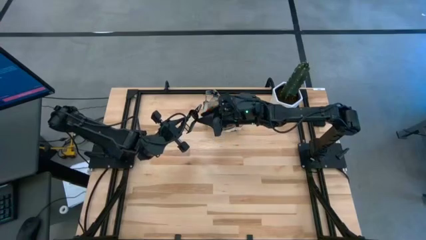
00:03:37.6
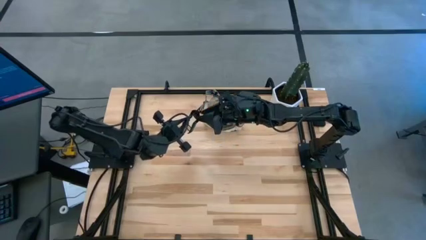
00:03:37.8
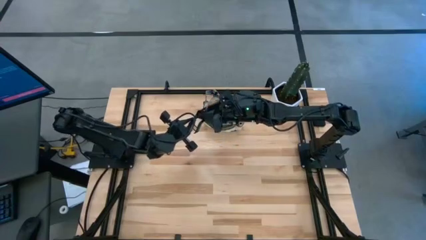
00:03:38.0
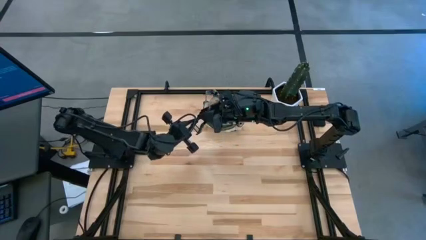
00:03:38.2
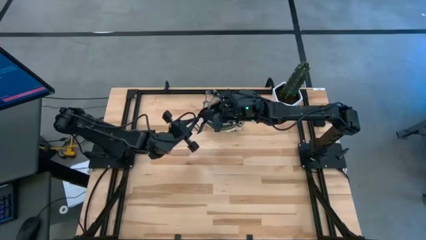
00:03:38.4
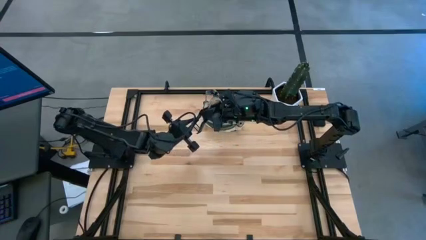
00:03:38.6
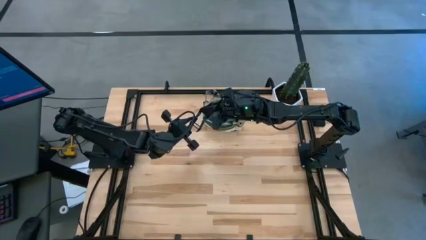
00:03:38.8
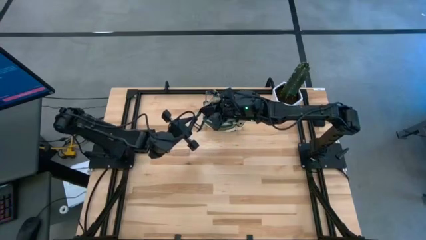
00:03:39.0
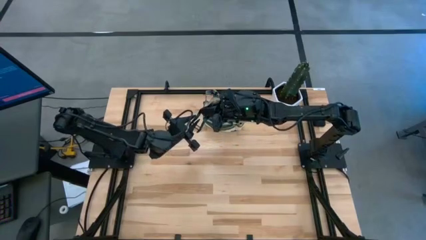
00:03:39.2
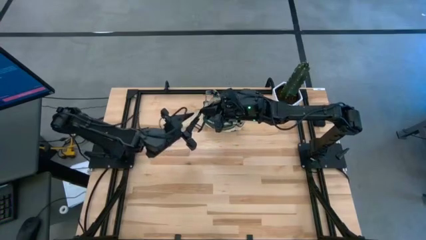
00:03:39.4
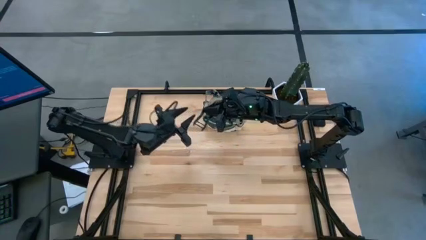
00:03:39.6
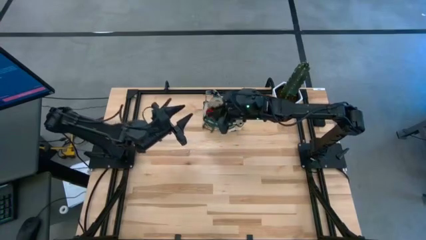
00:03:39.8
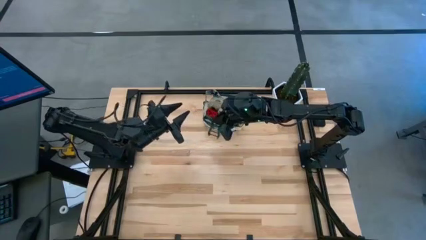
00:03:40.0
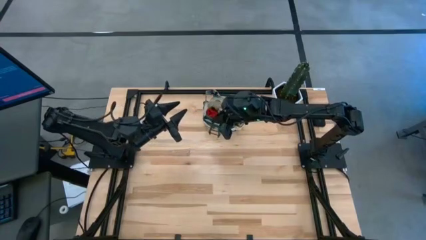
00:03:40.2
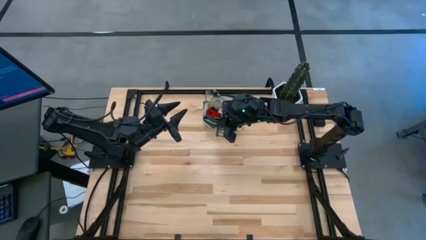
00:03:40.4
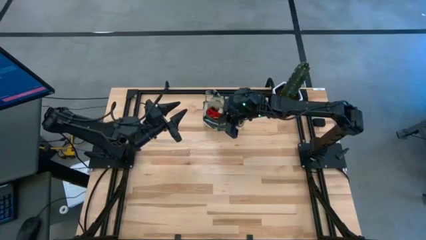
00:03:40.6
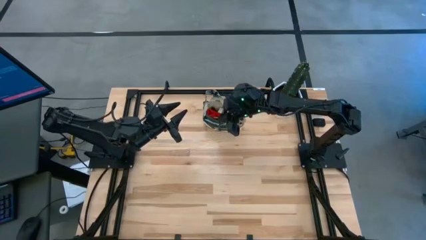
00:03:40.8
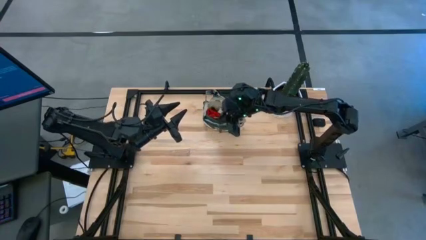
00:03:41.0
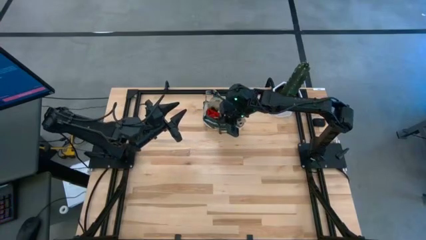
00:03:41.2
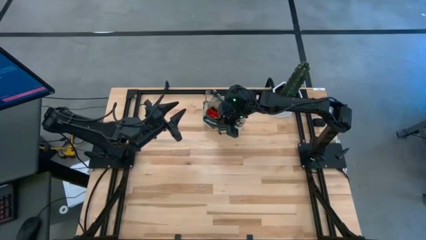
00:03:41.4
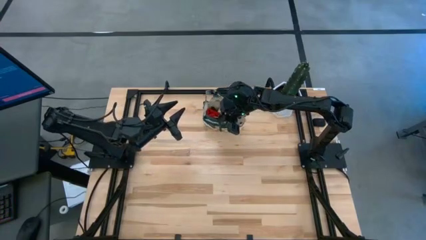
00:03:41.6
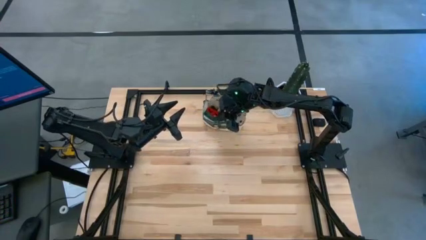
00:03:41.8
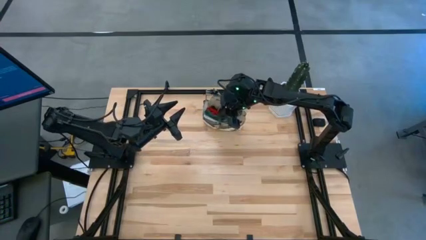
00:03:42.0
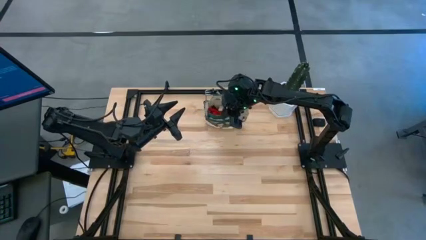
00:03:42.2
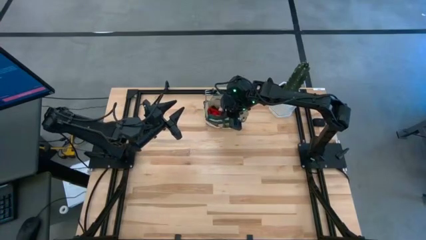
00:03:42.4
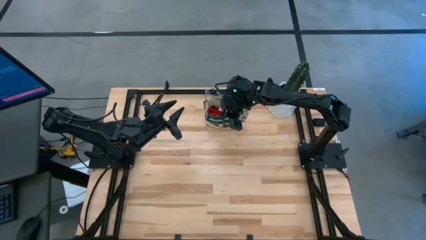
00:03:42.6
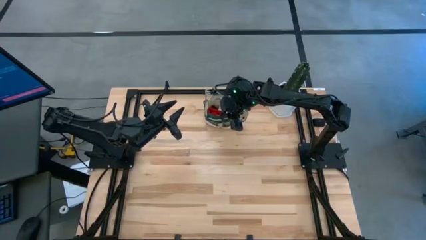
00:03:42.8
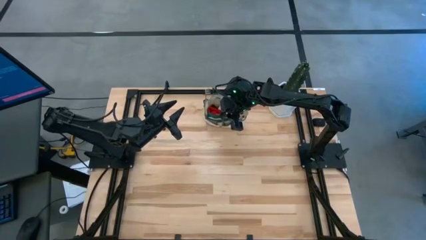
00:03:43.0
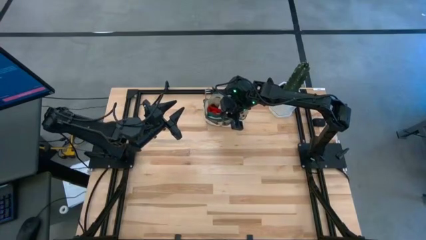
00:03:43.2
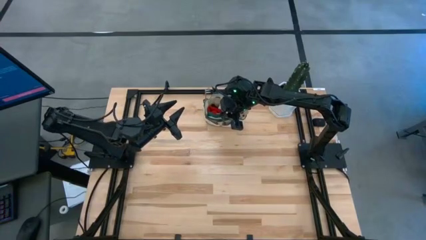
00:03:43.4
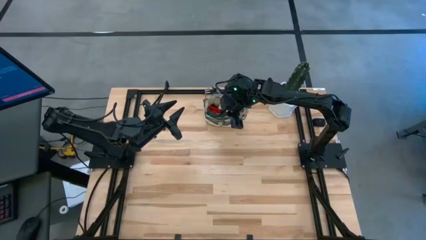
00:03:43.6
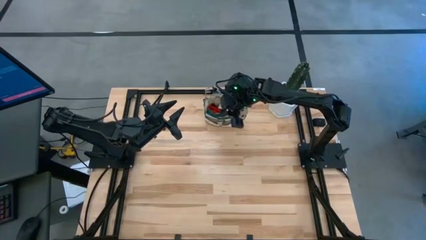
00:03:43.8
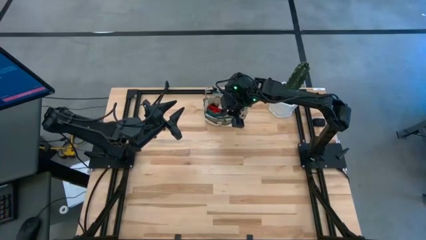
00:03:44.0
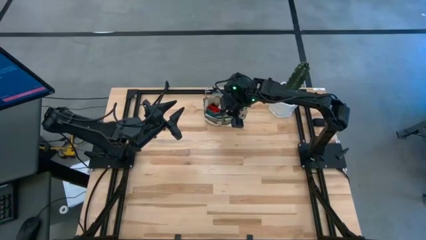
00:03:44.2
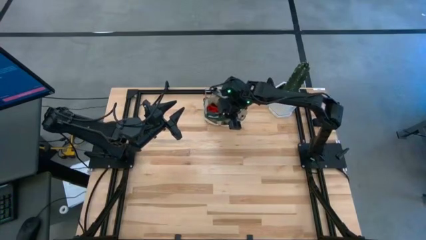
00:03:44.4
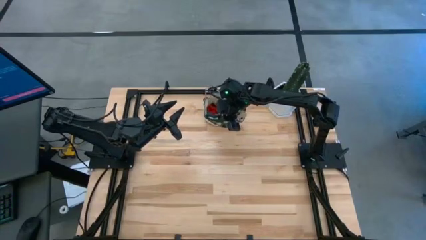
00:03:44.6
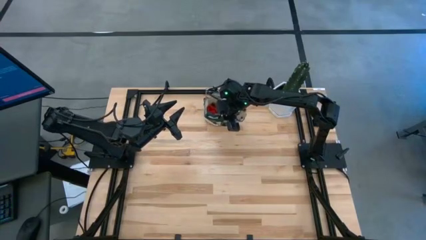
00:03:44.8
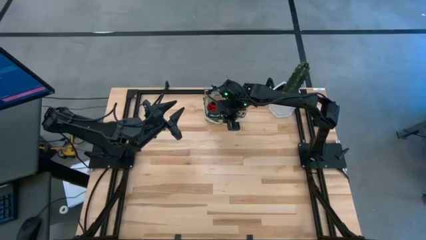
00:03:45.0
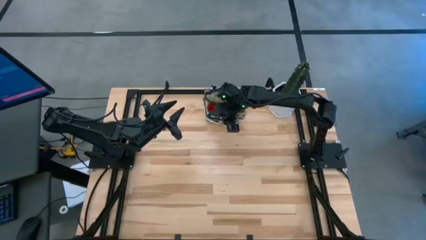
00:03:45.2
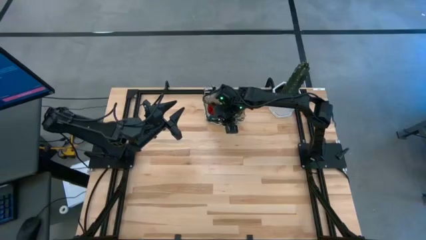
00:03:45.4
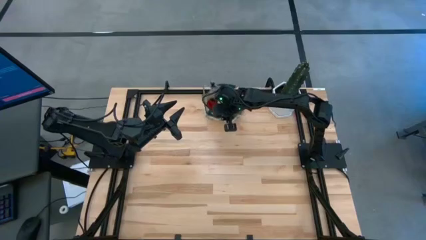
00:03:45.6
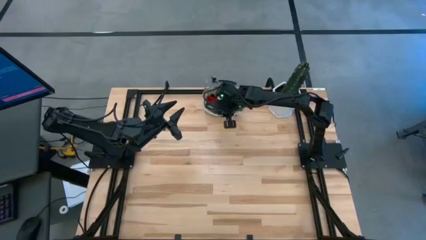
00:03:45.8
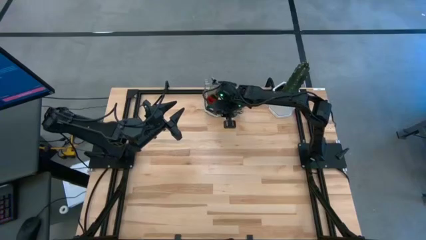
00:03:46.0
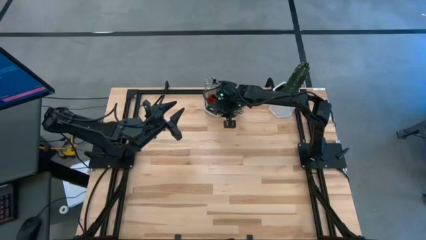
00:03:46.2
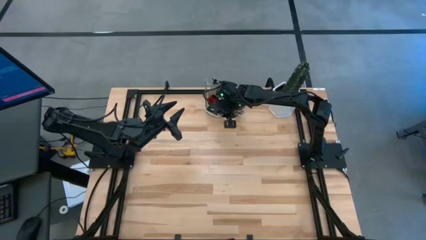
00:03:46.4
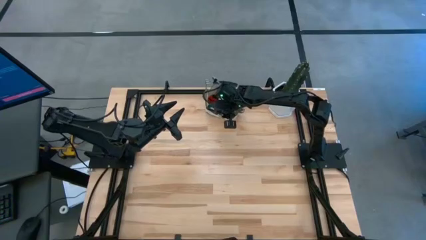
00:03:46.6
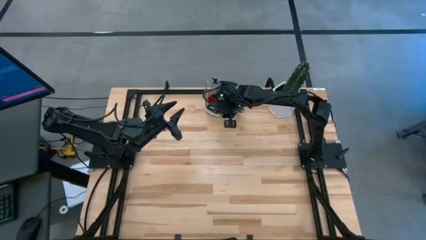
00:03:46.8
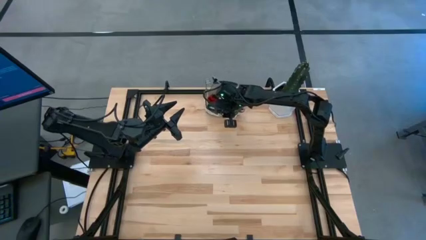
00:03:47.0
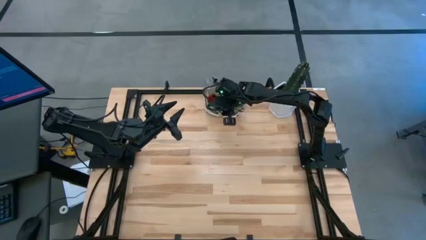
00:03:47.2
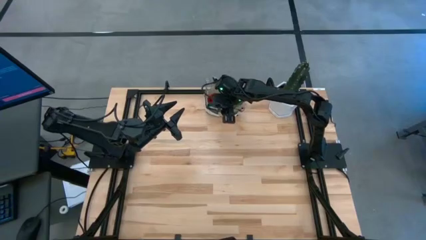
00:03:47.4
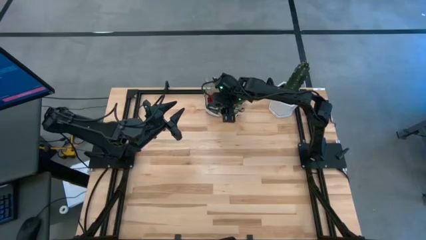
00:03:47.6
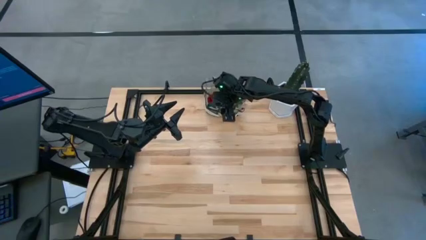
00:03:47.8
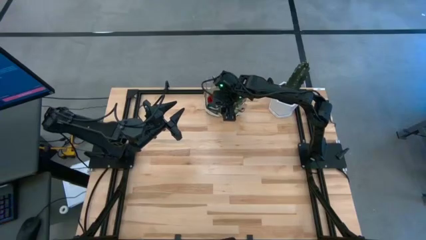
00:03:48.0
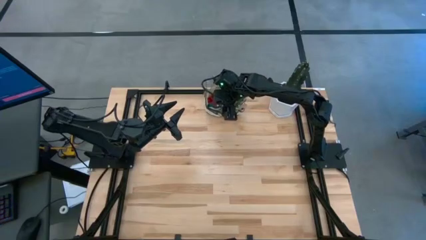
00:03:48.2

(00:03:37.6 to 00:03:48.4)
Task: Pick & Place Garden tools in Gardening bag
Put the green shears into the brown gardening bag
